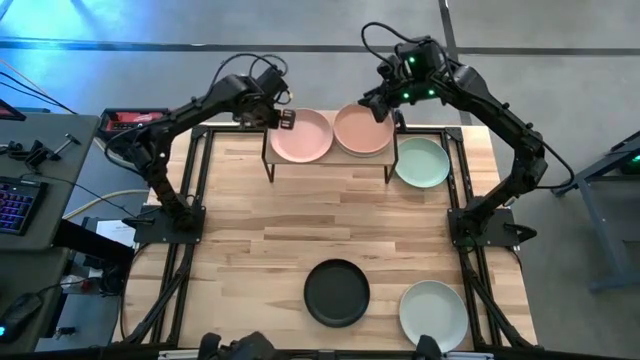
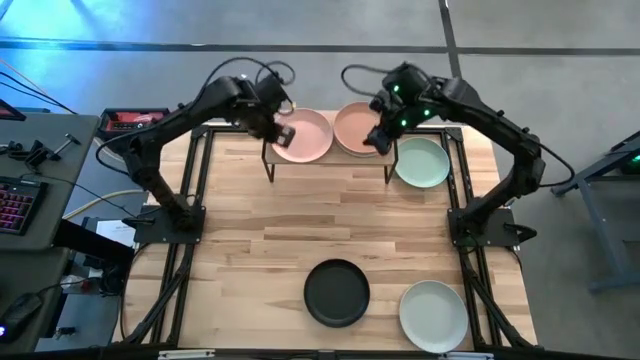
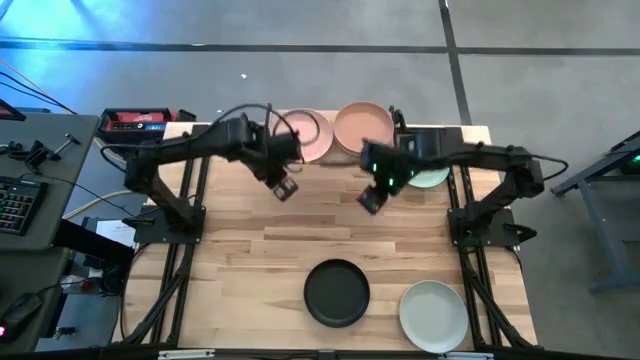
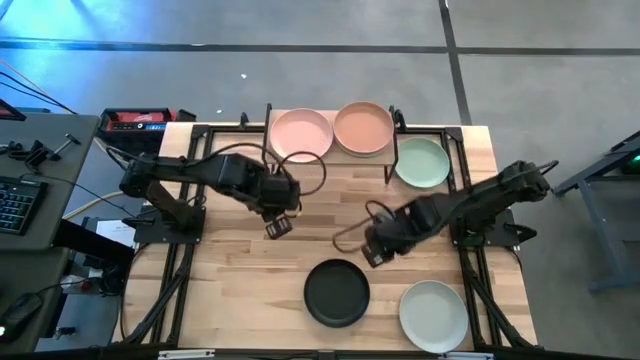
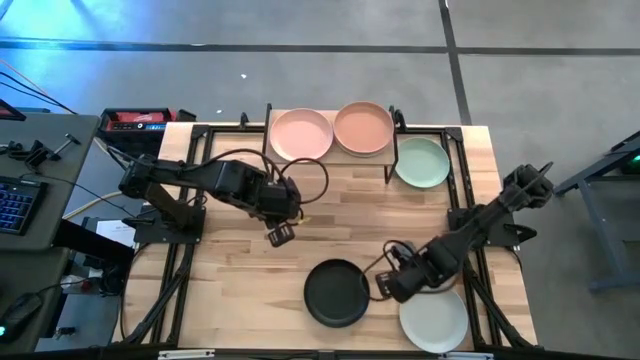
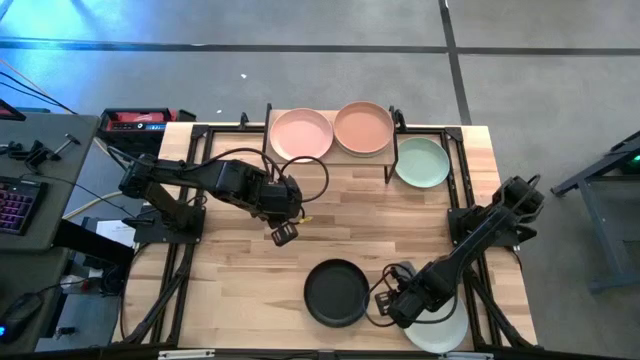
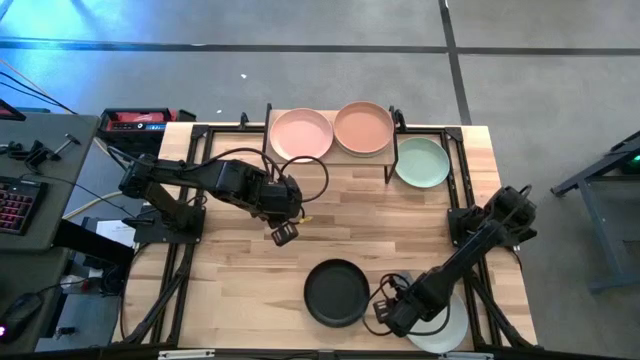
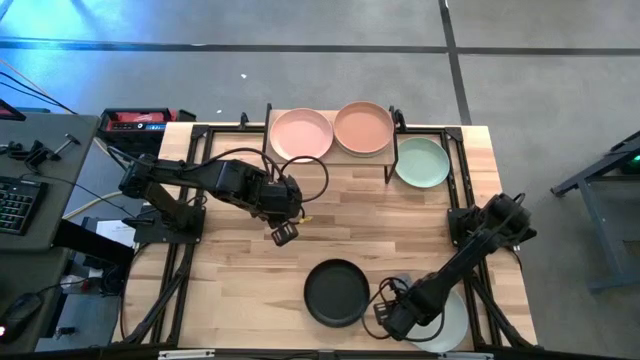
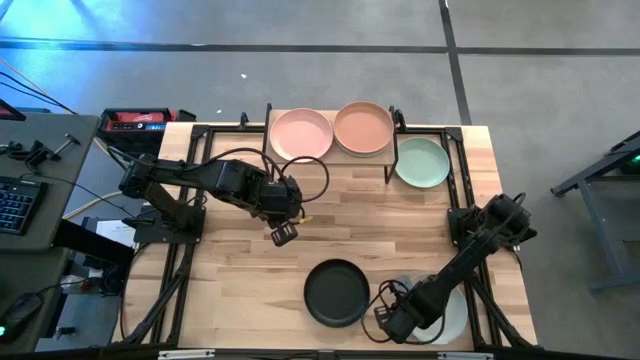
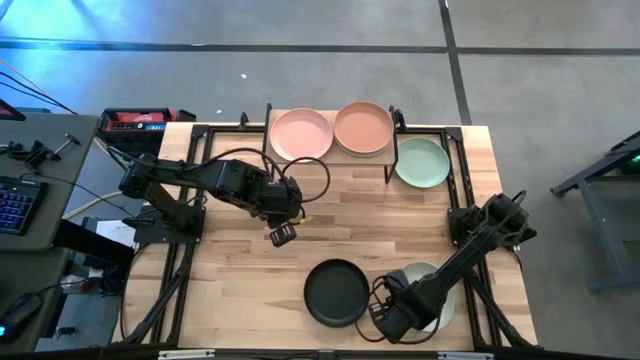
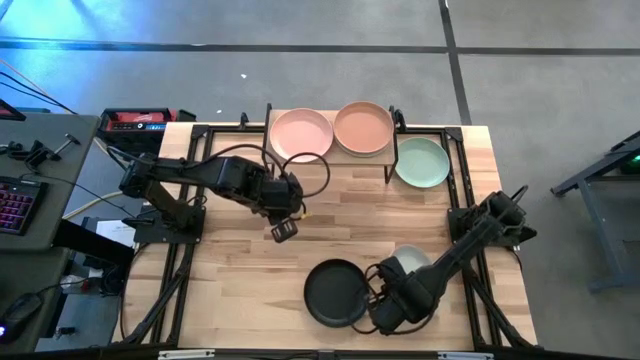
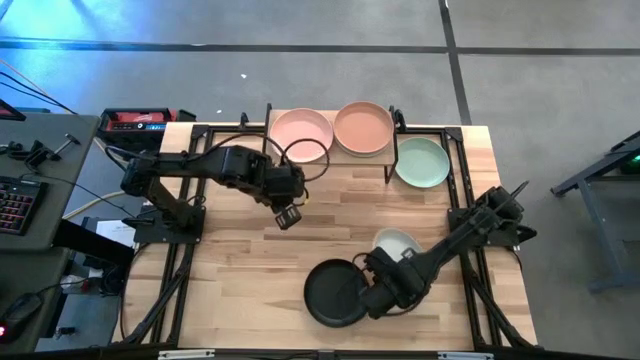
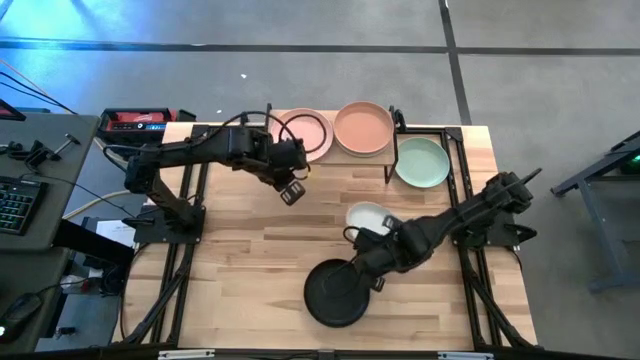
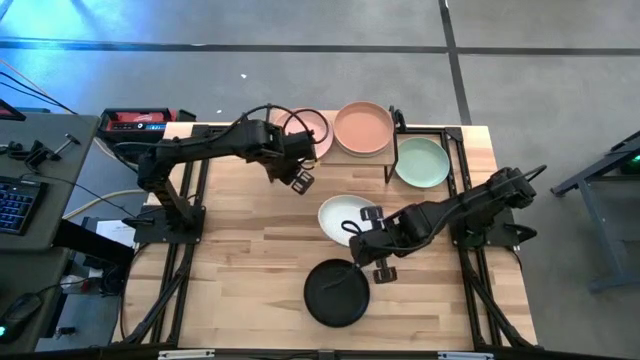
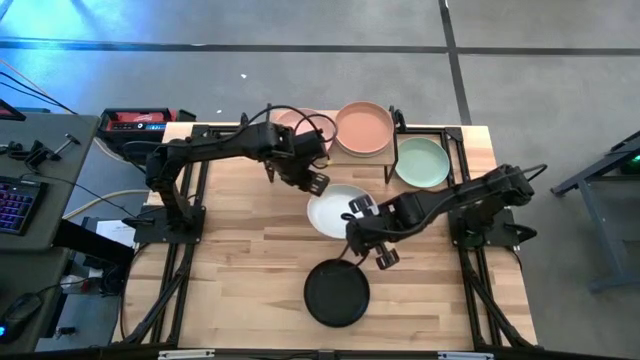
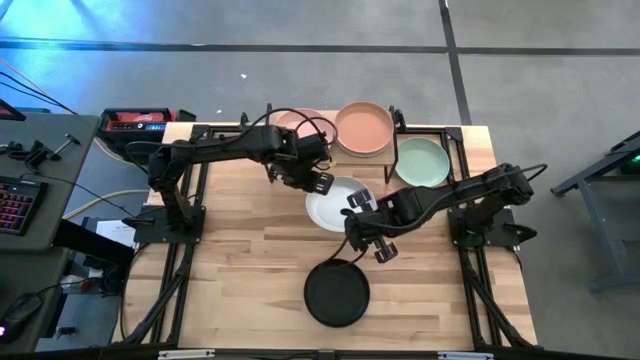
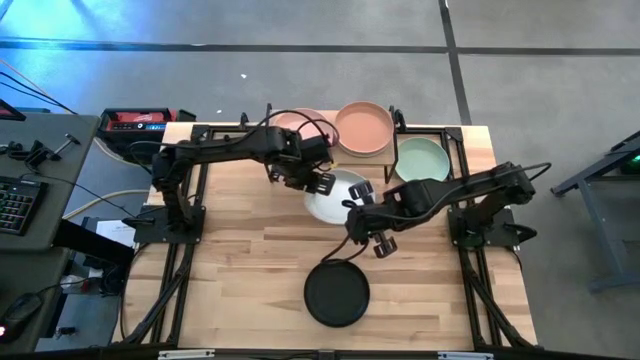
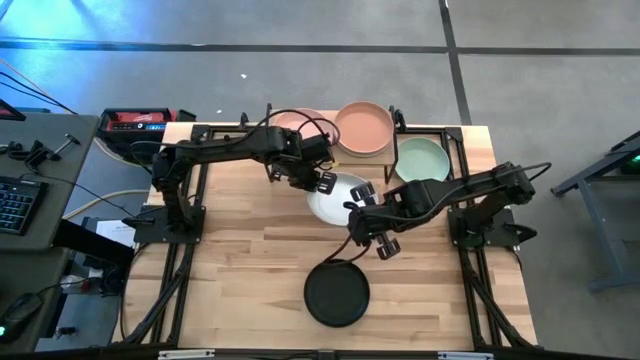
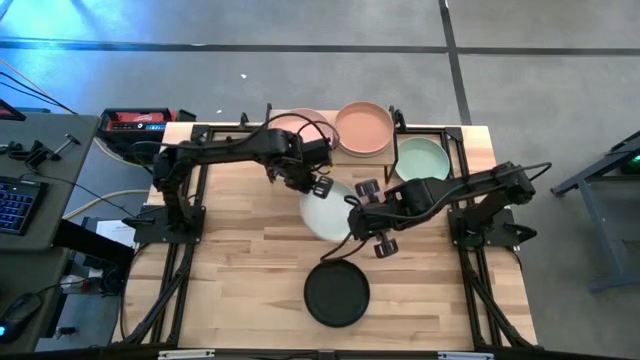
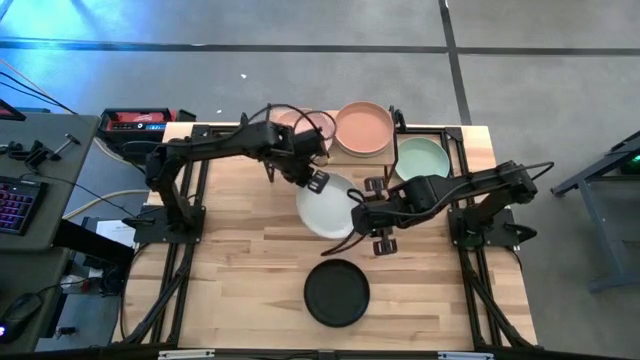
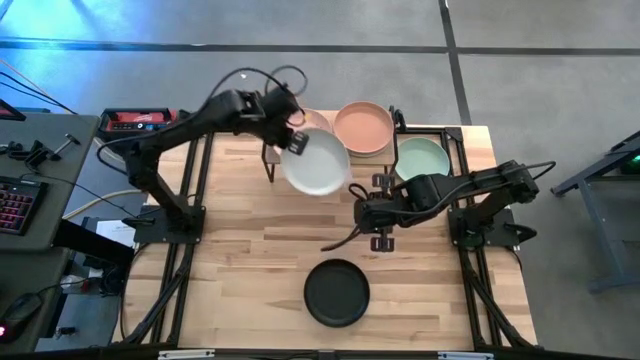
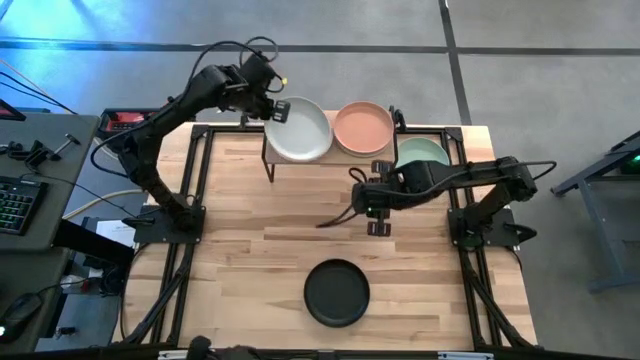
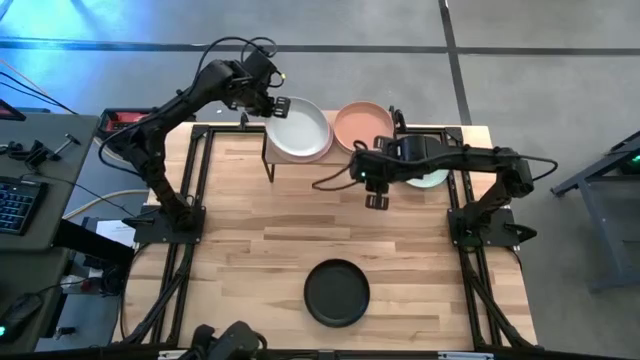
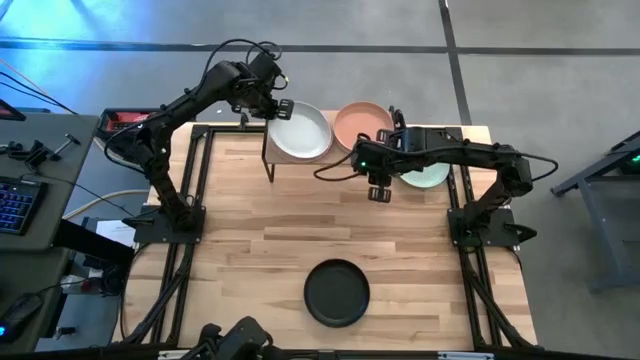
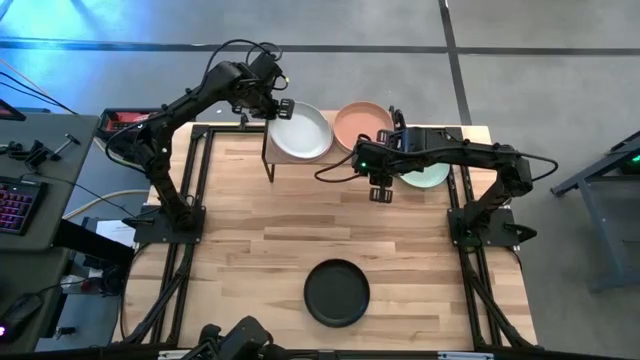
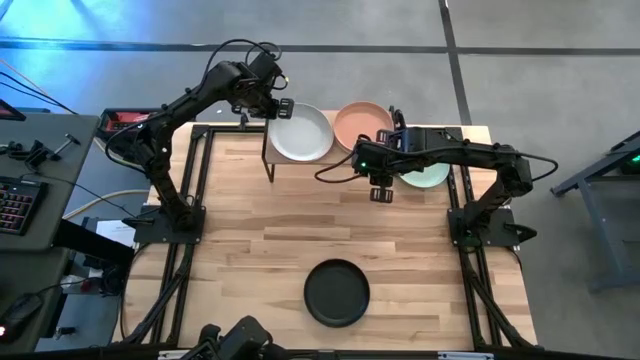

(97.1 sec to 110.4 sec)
Task: Place and stack plates onto a shelf
Stack the gray plate on top of the other pink plate on the shelf

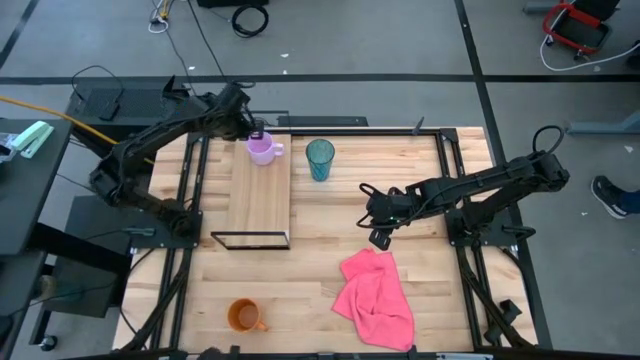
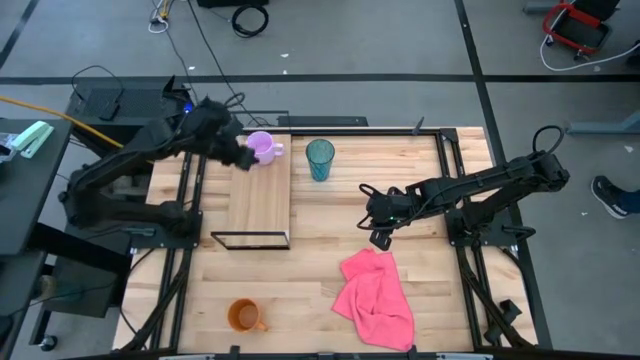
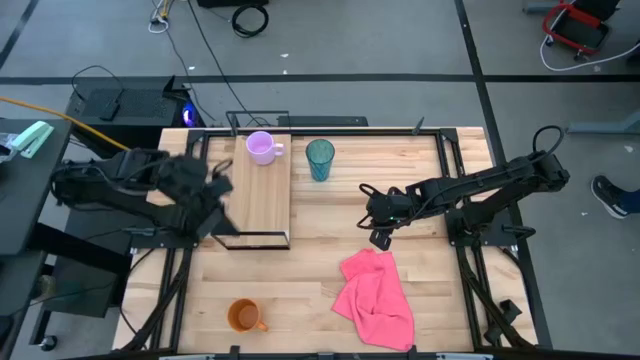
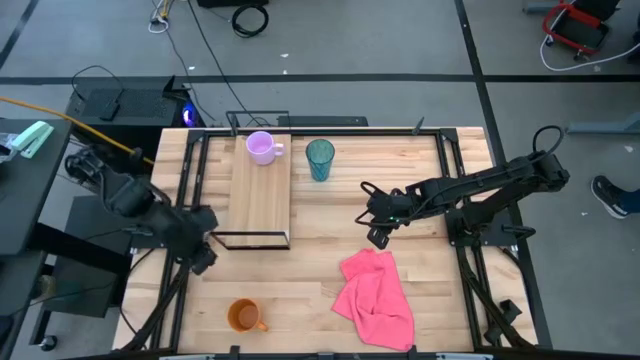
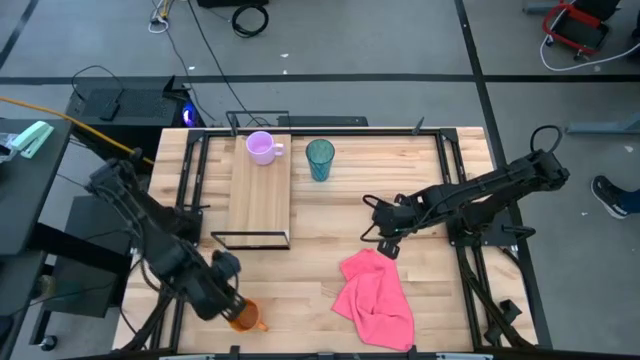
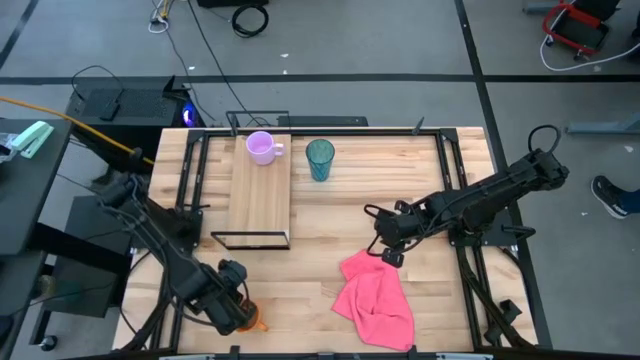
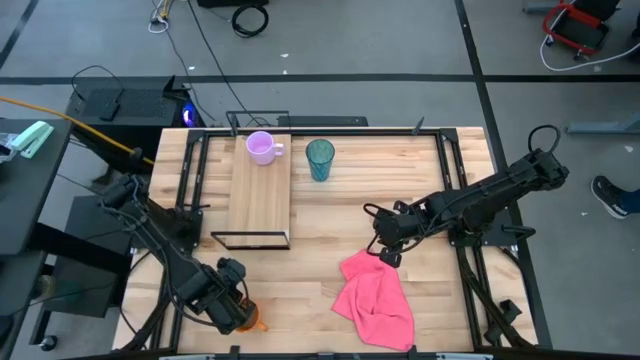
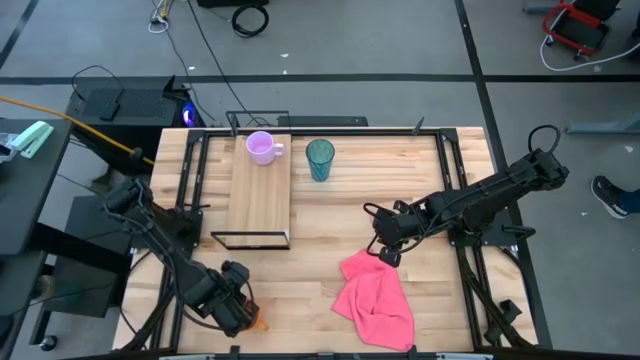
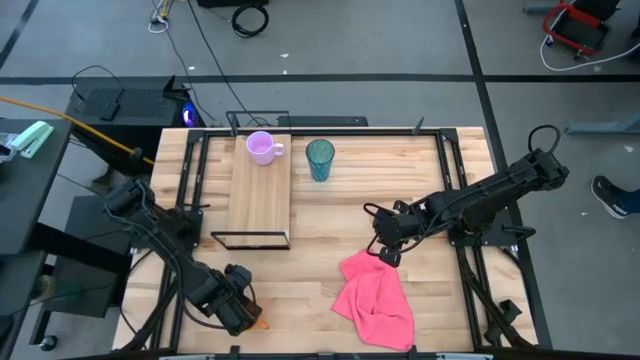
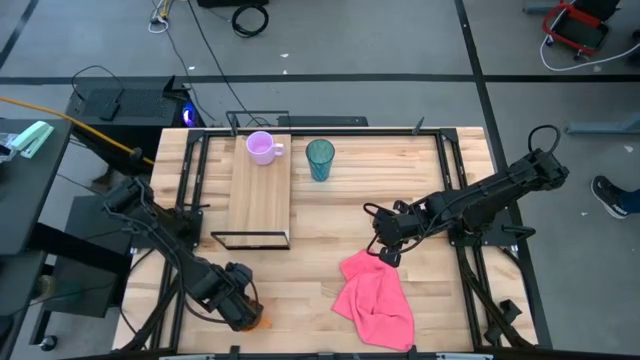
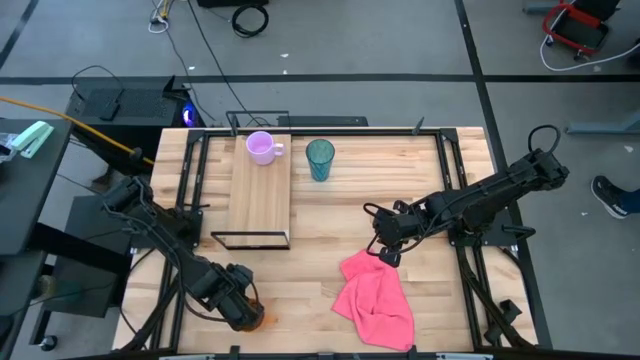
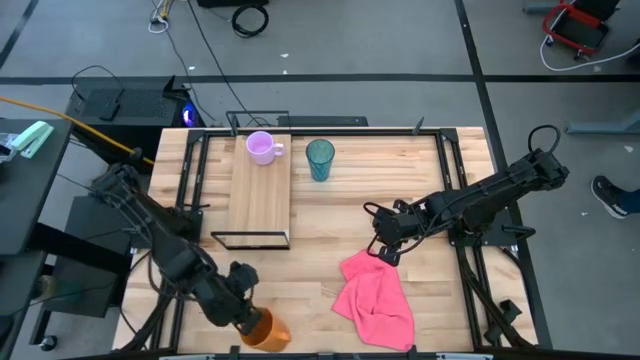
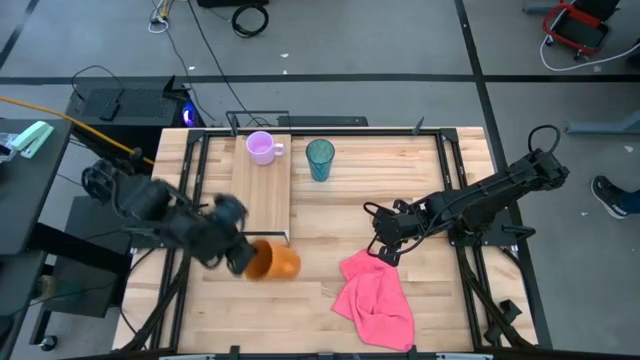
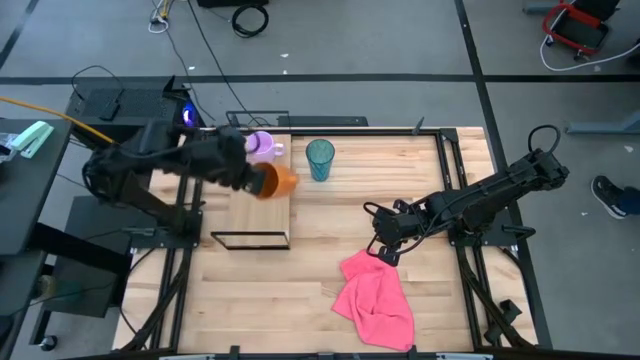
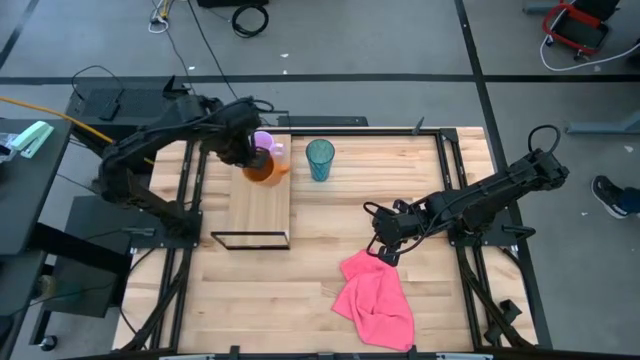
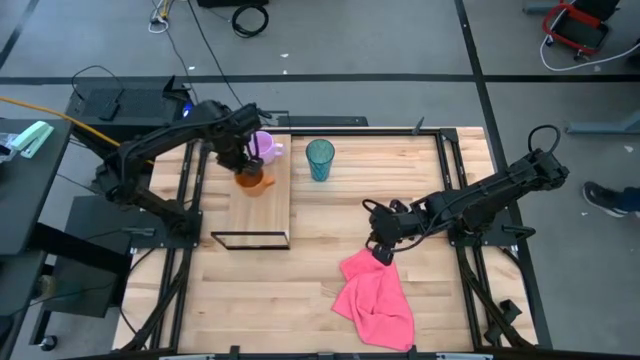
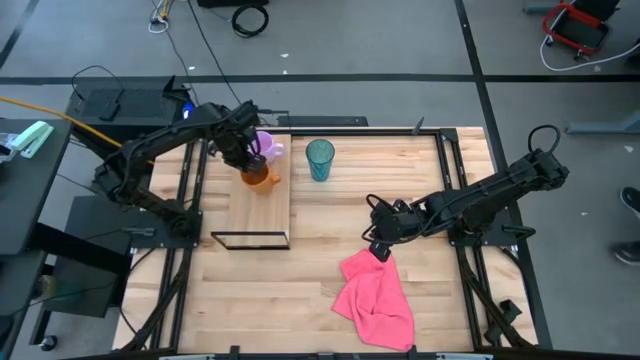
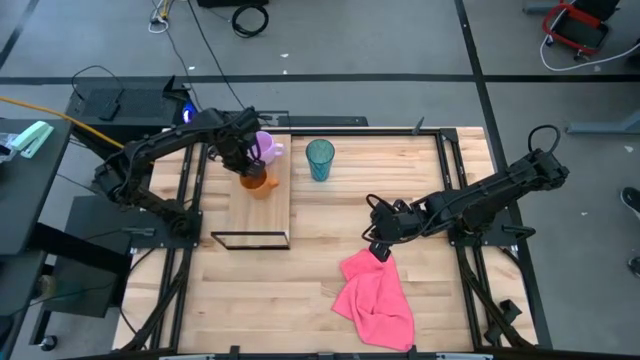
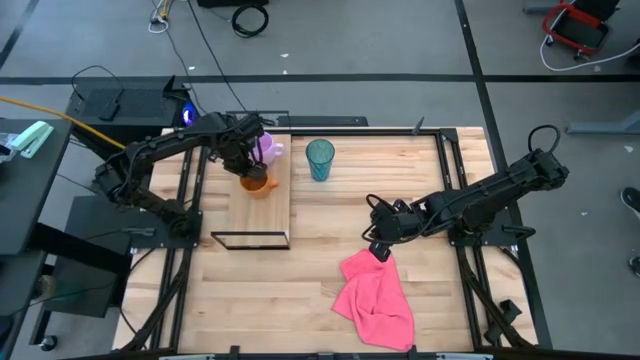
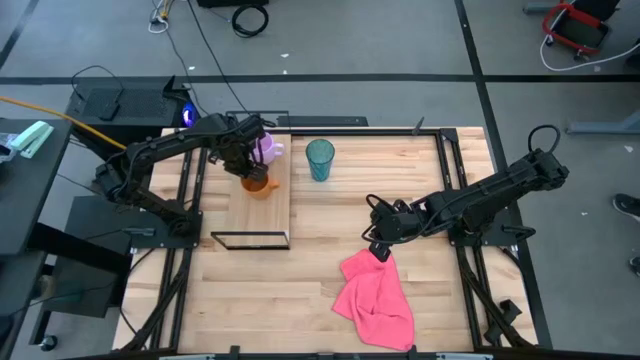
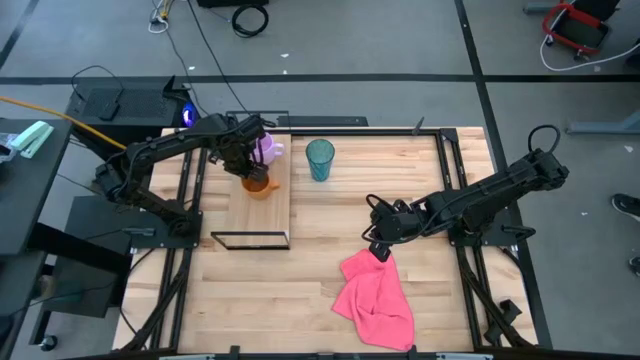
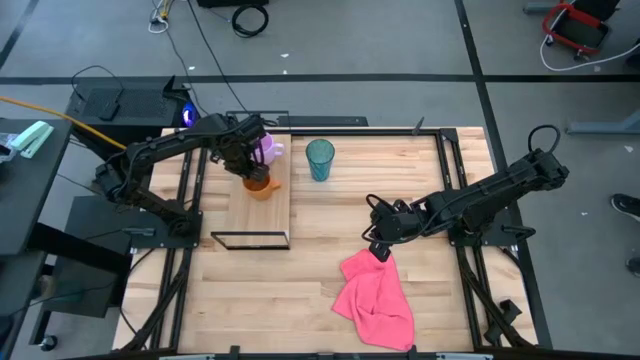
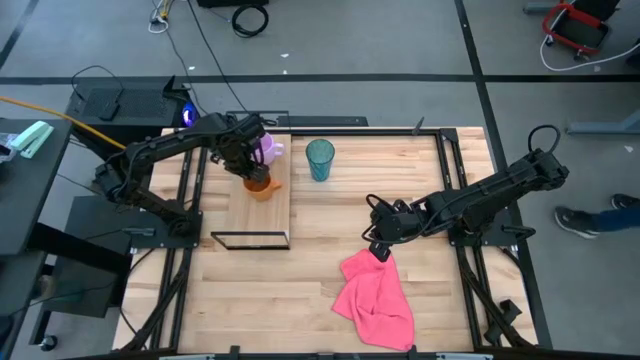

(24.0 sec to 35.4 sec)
Task: Stack small to large cups/mugs on shelf
Put the orange mug on the shelf
